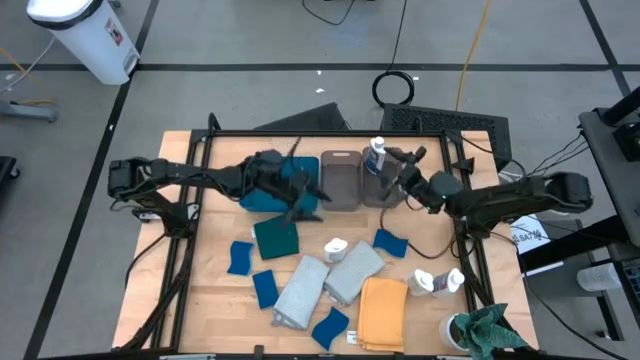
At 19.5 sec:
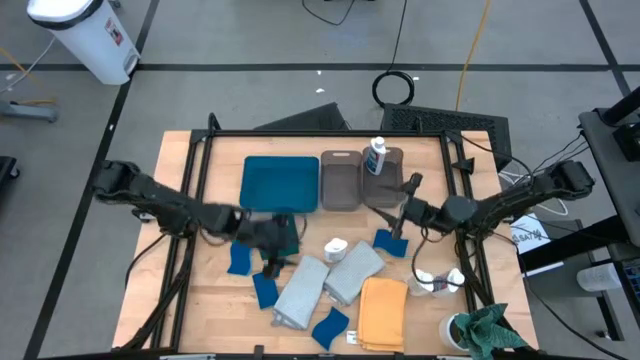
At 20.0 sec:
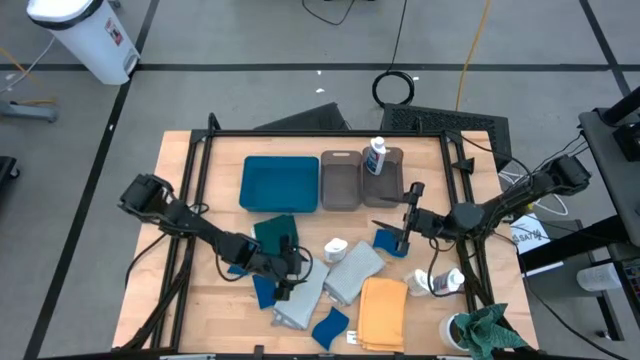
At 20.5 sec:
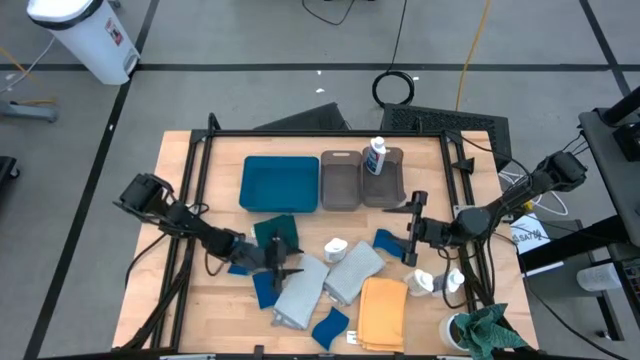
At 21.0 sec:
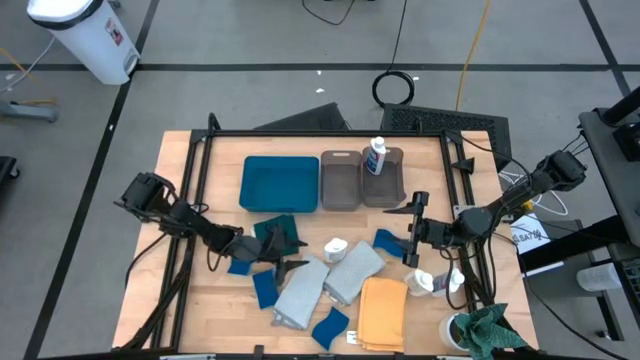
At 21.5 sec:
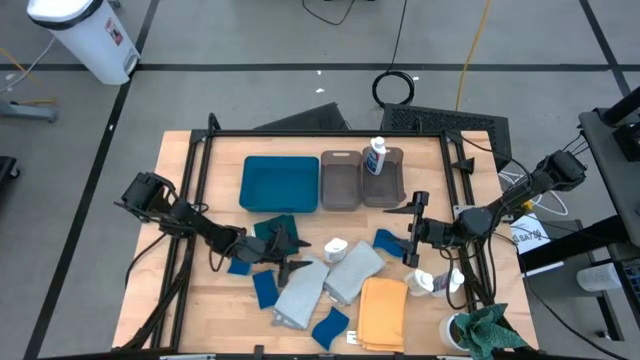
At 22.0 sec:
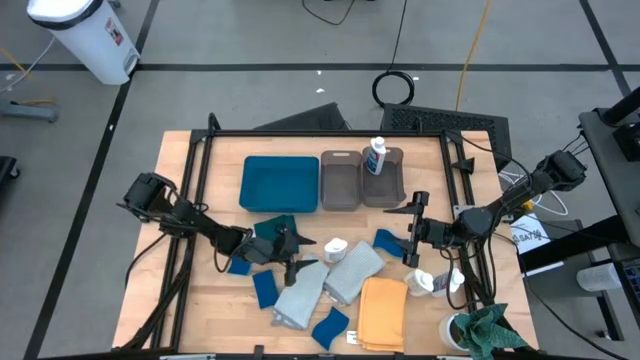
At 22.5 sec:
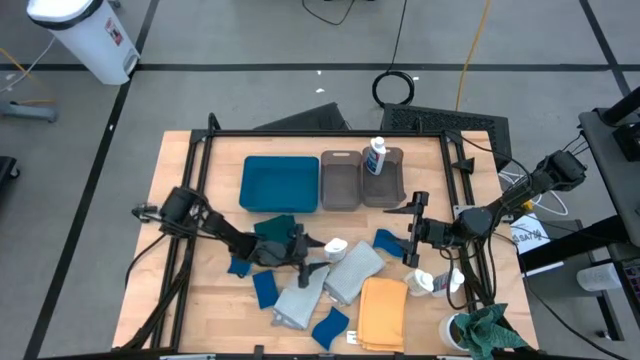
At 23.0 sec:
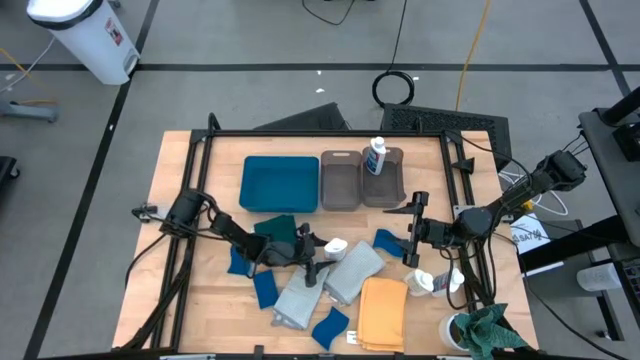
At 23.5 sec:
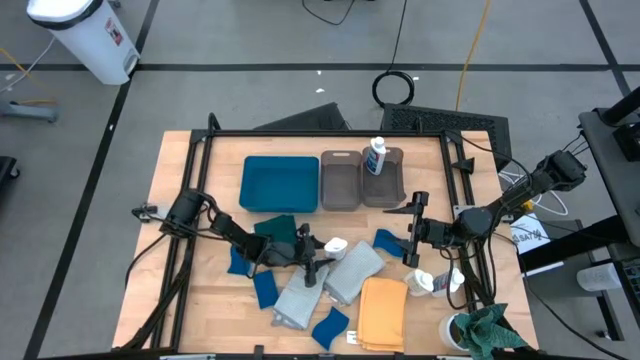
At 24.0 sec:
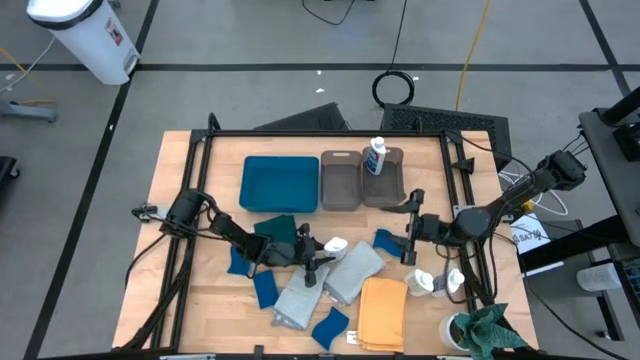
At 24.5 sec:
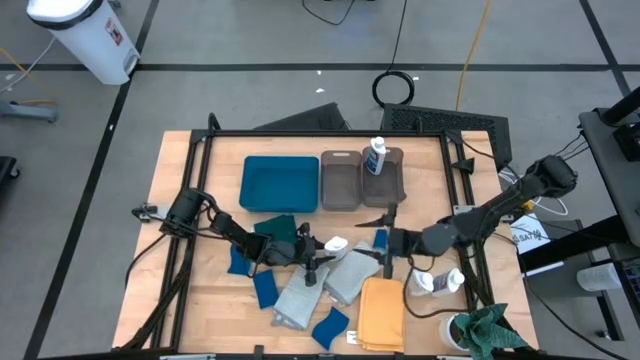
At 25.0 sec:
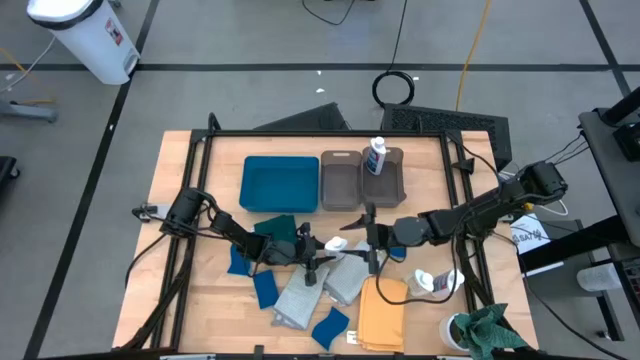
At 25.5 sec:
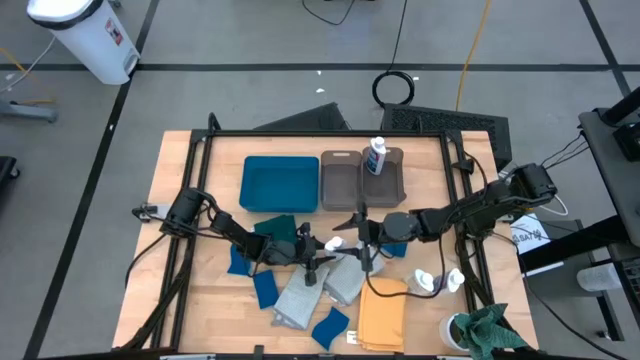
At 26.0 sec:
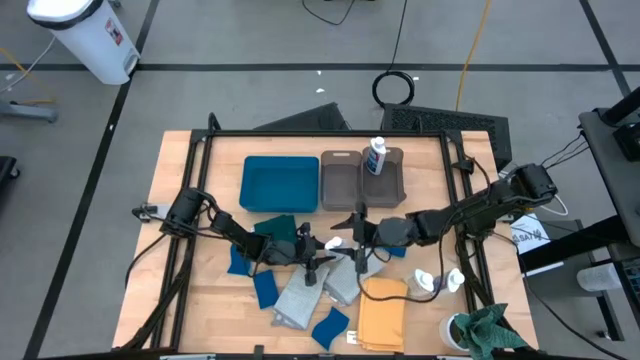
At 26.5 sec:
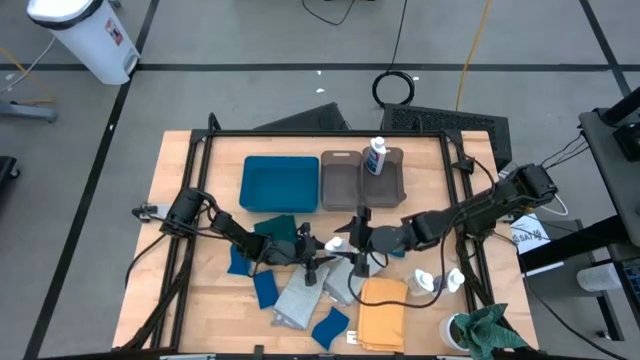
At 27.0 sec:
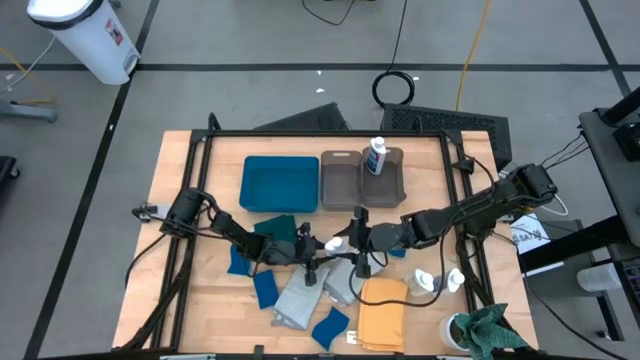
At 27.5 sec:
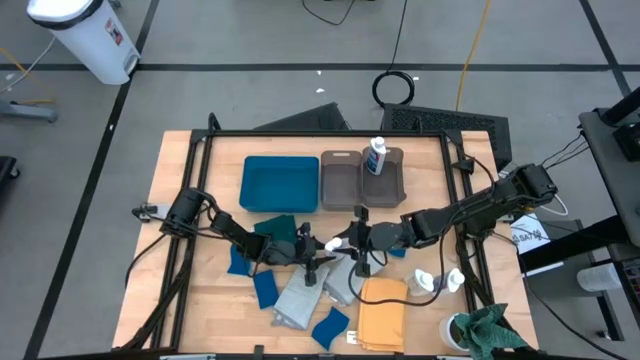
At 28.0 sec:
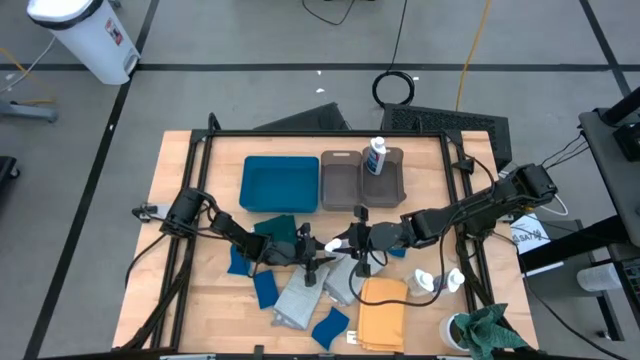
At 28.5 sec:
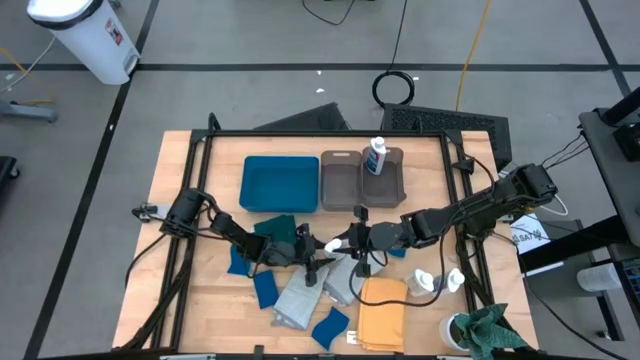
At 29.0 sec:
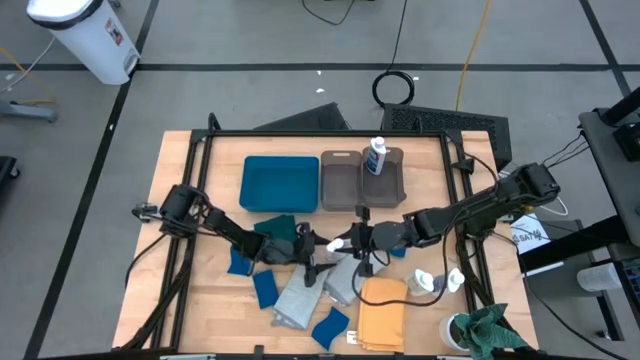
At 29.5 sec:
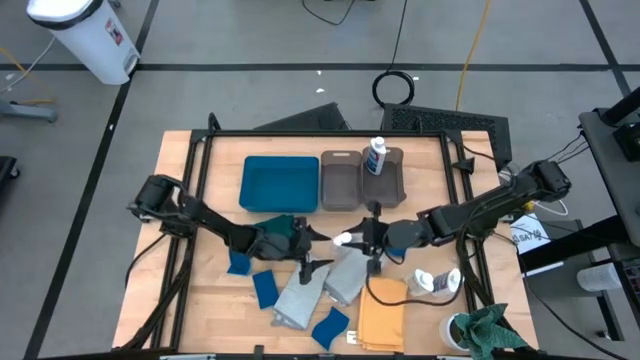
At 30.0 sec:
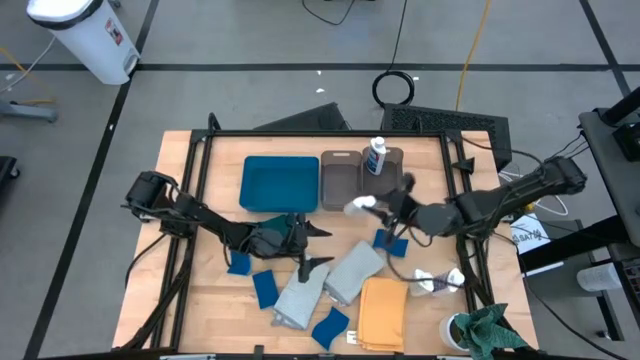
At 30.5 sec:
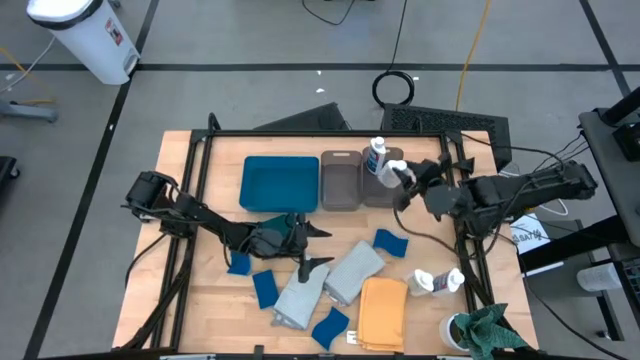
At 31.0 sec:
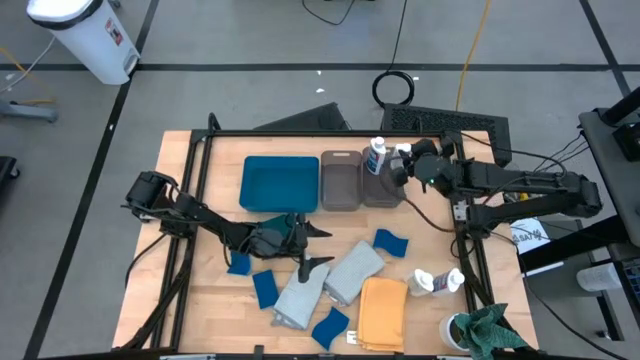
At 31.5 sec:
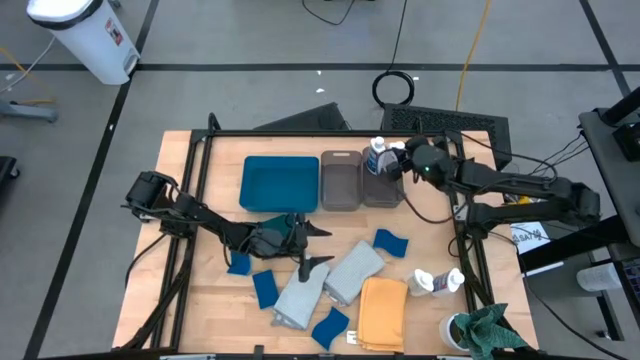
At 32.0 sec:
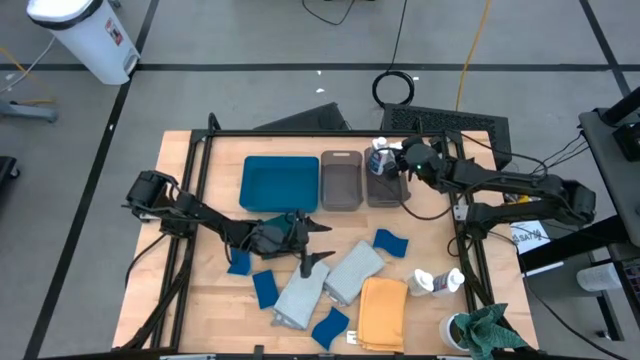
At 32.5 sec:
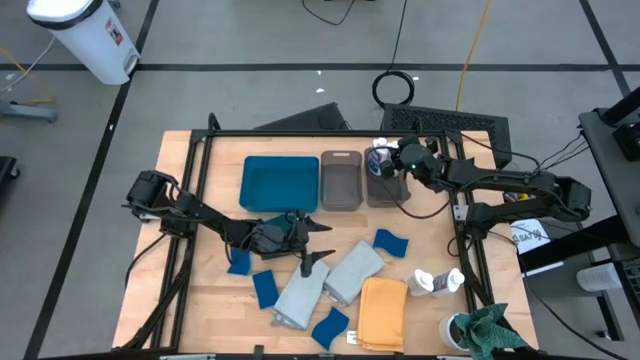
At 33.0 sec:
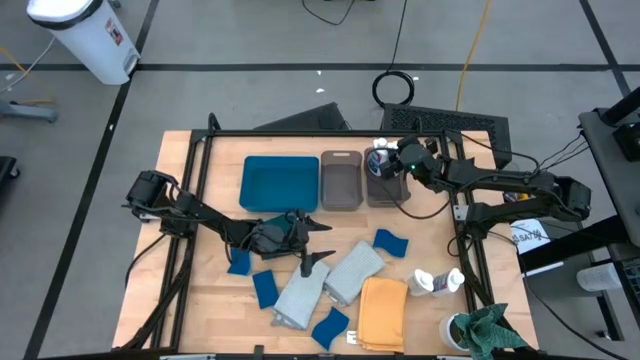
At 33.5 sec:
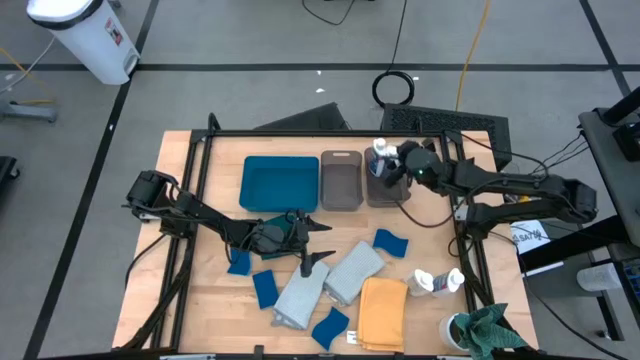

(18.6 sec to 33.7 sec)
Task: Pick & Place Kitchen Items
Put the white plastic restorer bottle into the right black bin

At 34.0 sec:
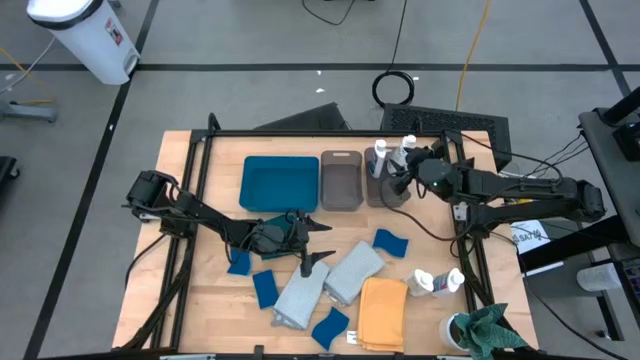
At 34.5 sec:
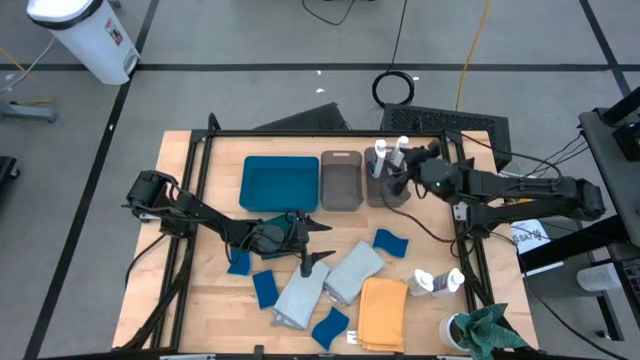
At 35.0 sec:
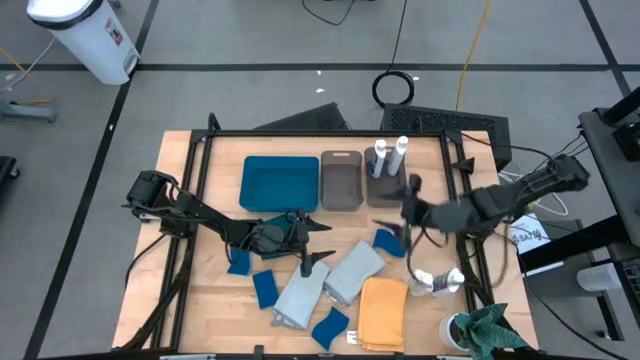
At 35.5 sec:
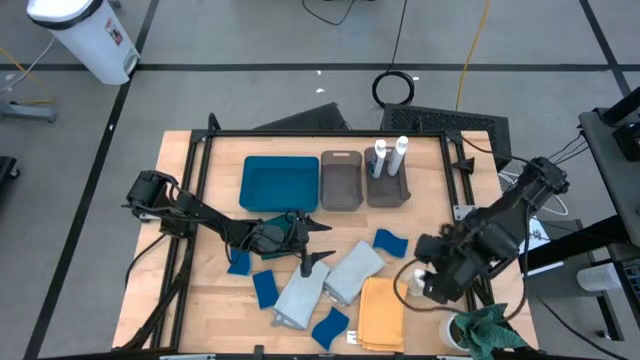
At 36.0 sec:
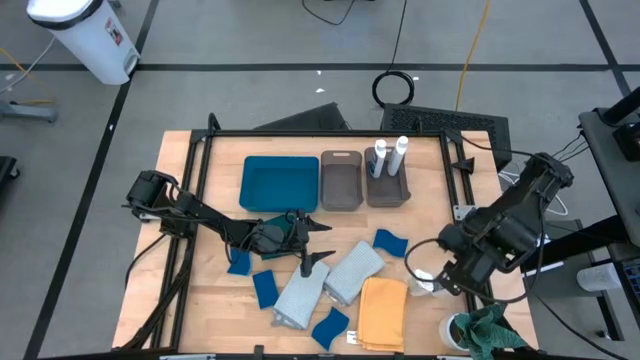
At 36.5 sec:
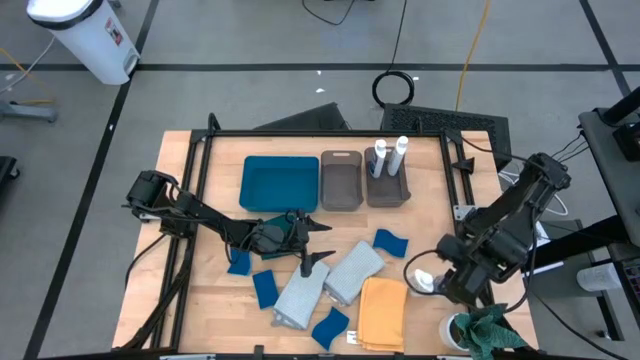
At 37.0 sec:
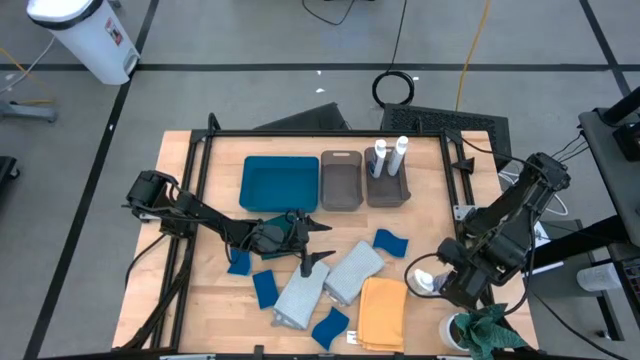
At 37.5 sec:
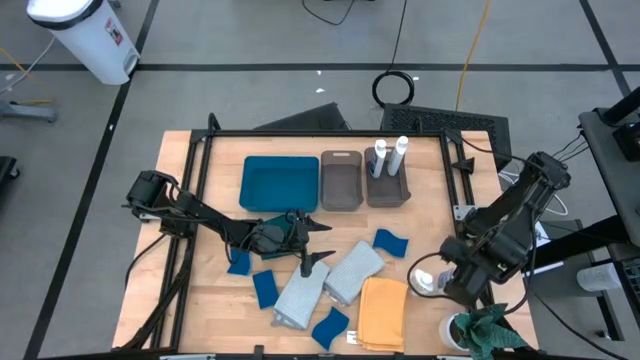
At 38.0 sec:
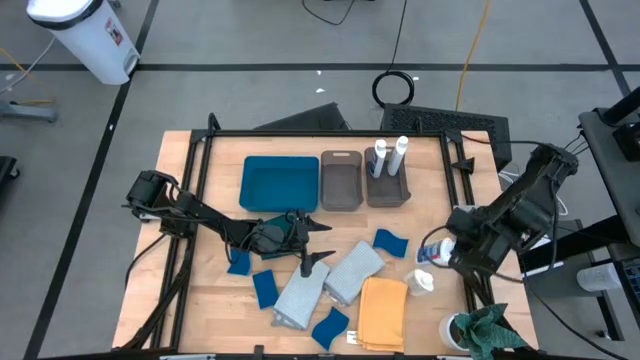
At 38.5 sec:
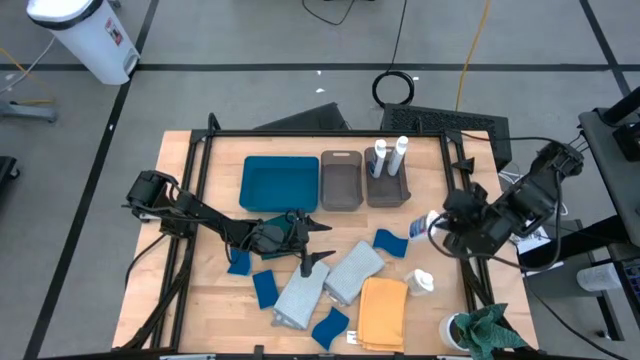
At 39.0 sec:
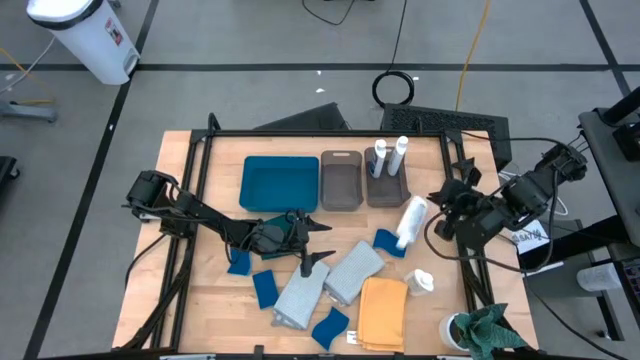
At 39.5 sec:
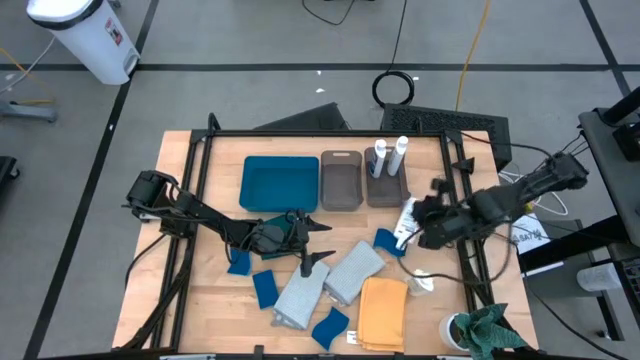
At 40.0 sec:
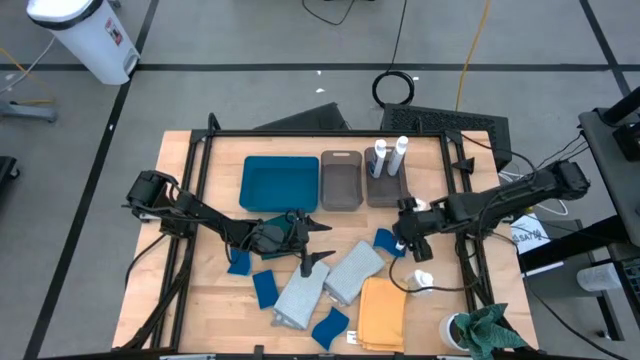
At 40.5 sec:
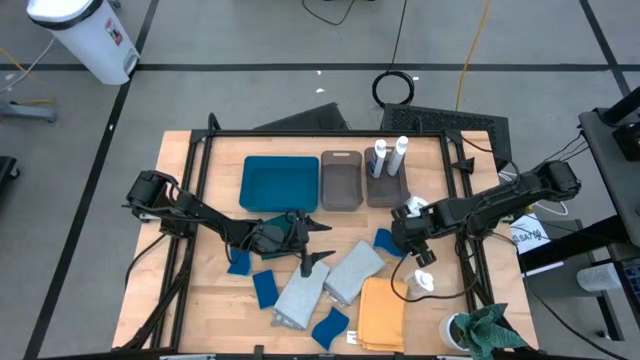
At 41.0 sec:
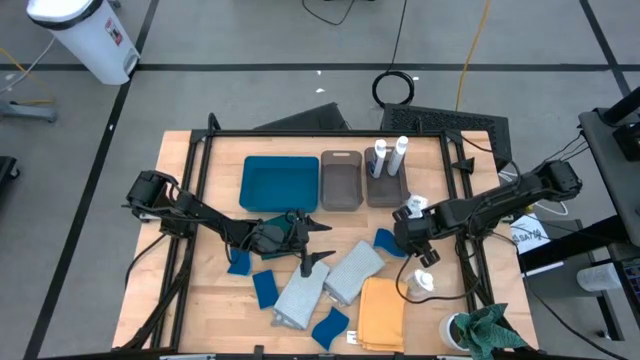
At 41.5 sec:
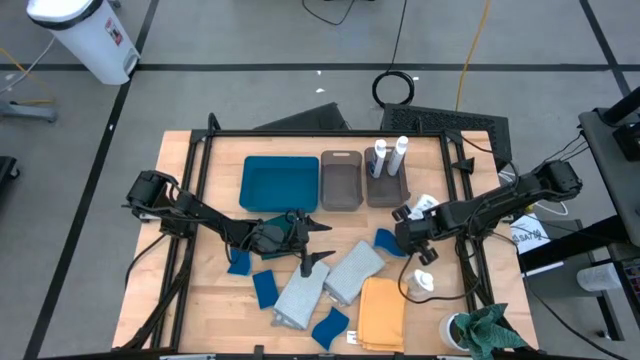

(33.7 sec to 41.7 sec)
Put the white plastic restorer bottle into the right black bin
